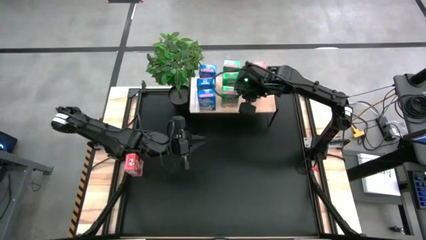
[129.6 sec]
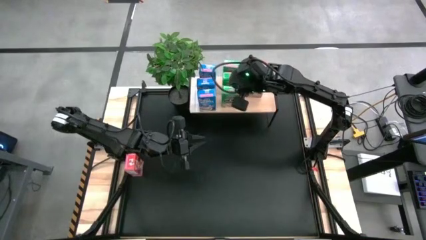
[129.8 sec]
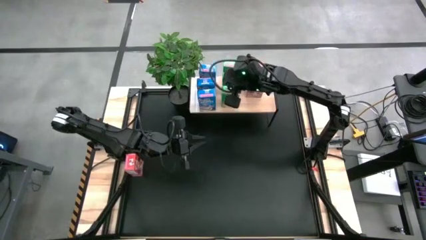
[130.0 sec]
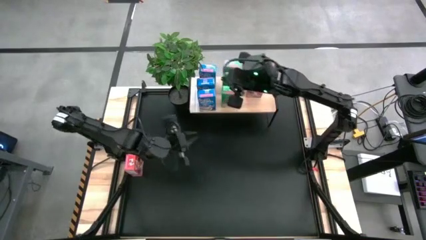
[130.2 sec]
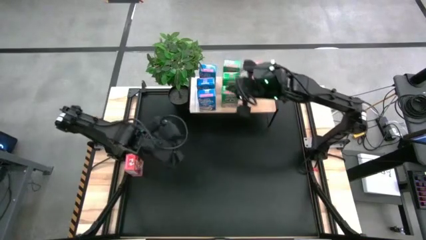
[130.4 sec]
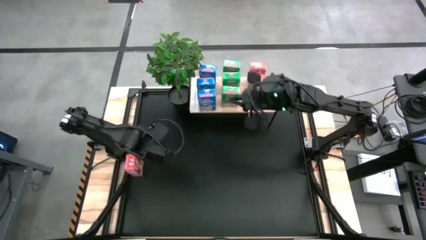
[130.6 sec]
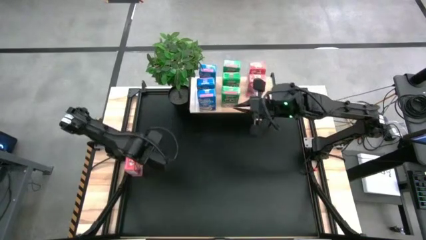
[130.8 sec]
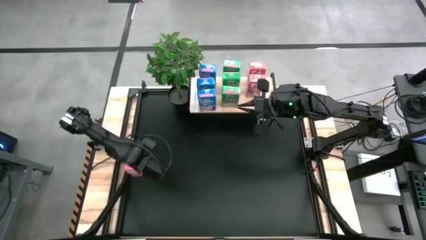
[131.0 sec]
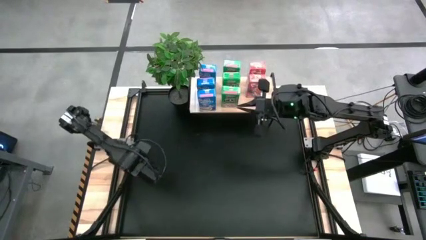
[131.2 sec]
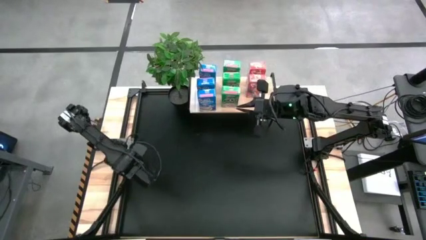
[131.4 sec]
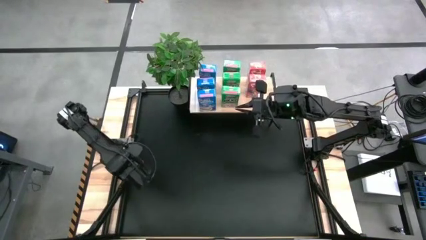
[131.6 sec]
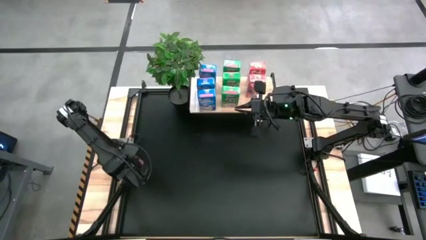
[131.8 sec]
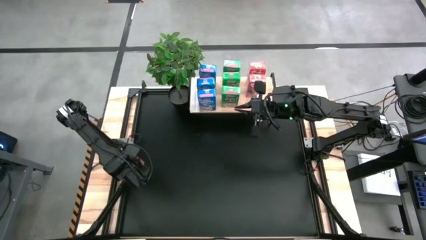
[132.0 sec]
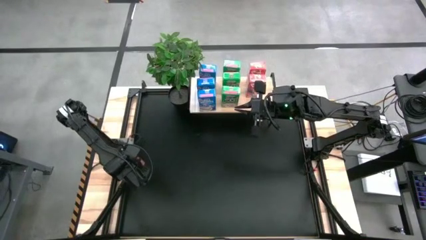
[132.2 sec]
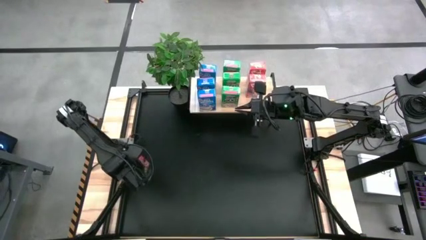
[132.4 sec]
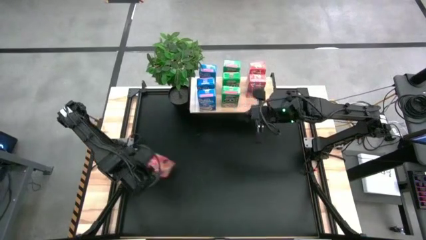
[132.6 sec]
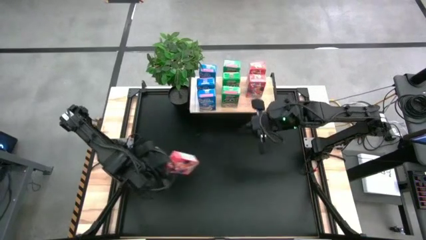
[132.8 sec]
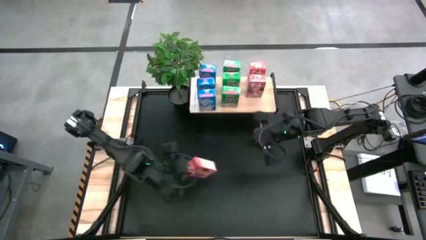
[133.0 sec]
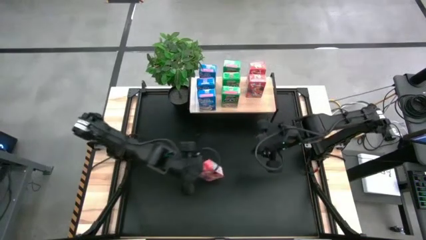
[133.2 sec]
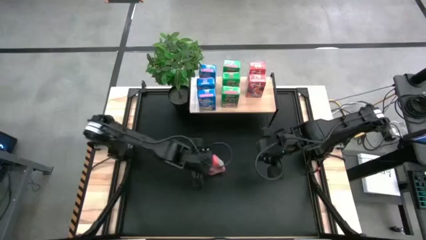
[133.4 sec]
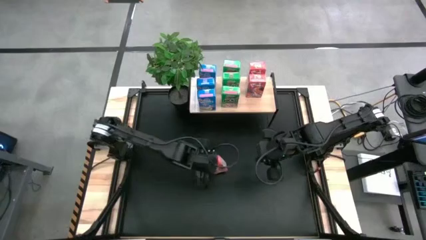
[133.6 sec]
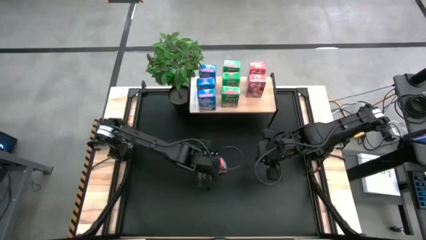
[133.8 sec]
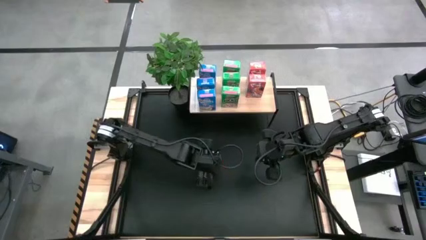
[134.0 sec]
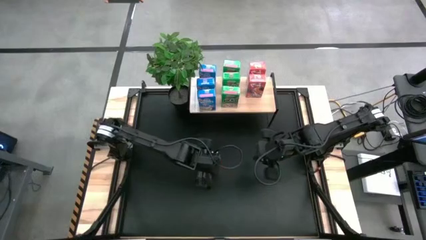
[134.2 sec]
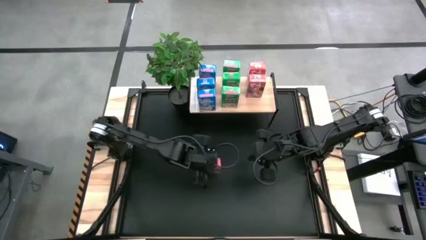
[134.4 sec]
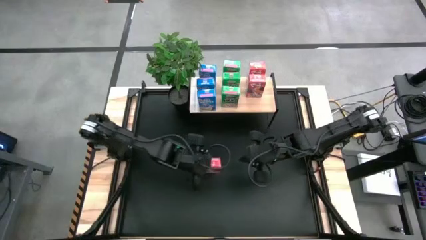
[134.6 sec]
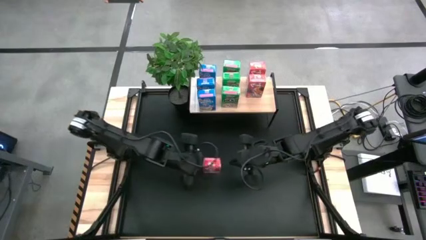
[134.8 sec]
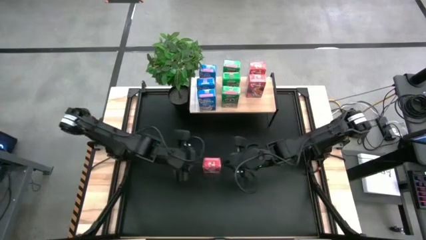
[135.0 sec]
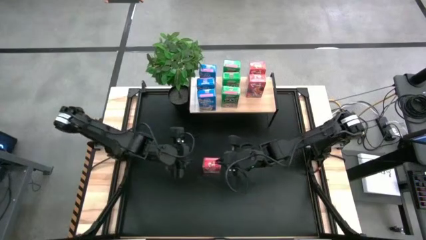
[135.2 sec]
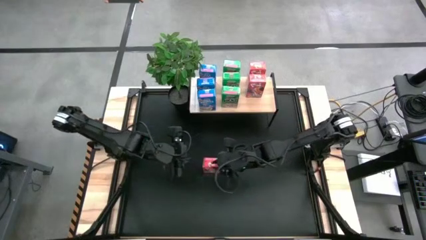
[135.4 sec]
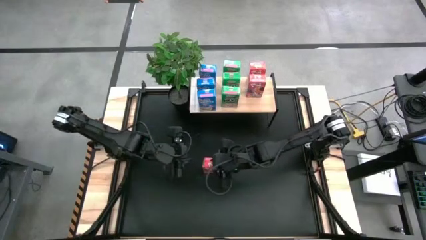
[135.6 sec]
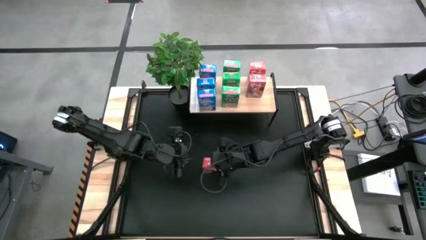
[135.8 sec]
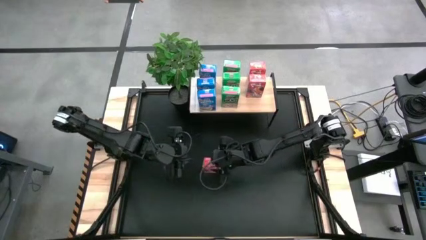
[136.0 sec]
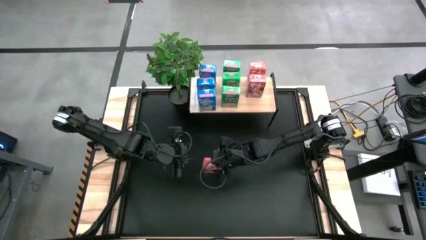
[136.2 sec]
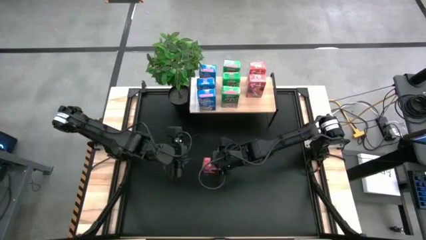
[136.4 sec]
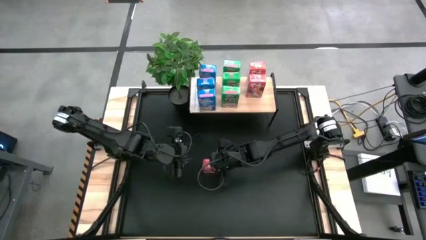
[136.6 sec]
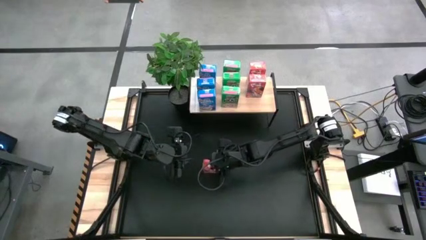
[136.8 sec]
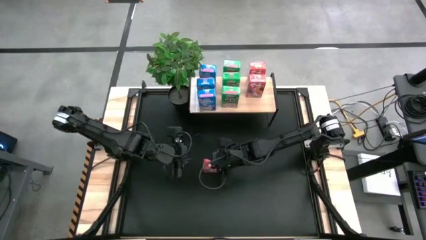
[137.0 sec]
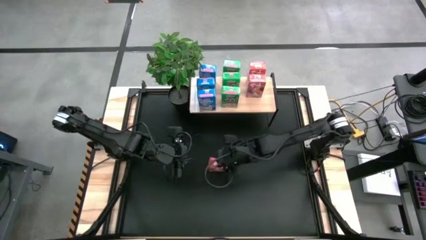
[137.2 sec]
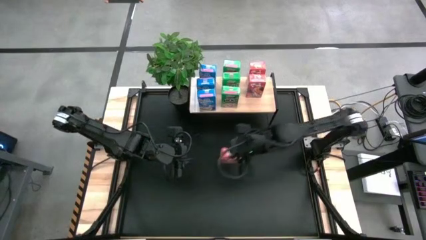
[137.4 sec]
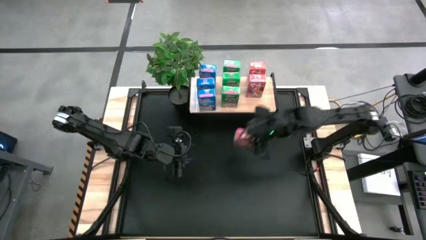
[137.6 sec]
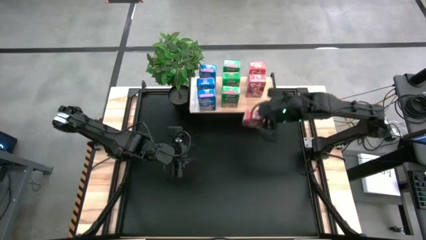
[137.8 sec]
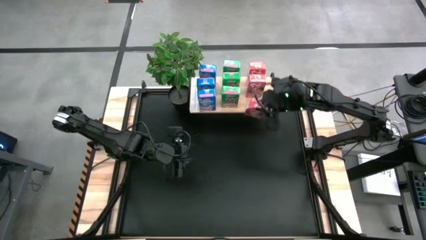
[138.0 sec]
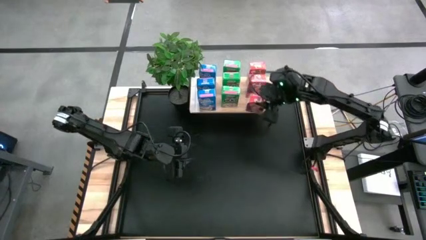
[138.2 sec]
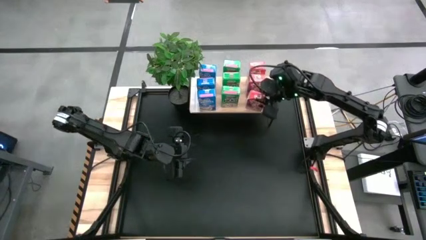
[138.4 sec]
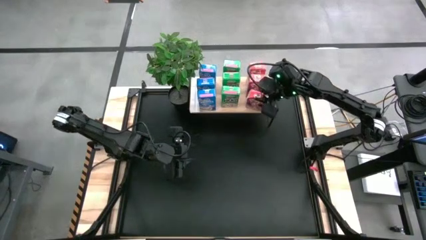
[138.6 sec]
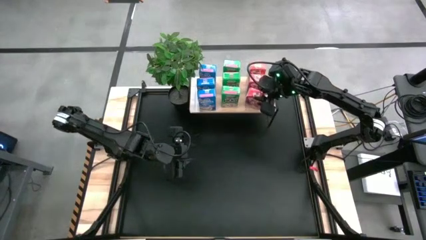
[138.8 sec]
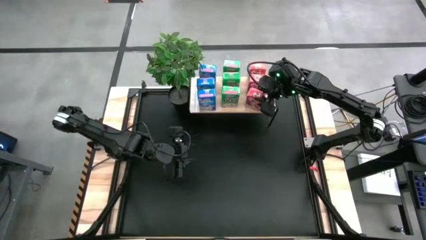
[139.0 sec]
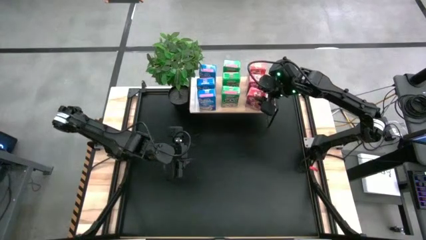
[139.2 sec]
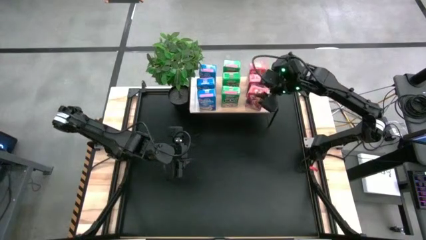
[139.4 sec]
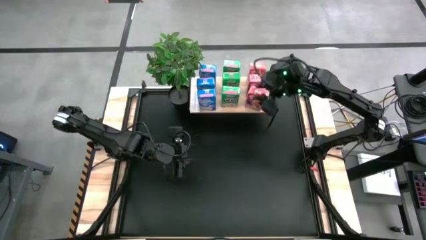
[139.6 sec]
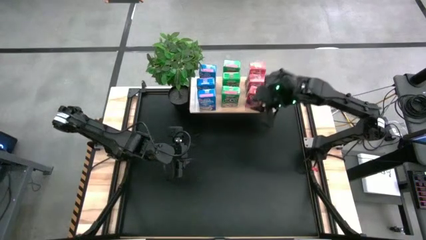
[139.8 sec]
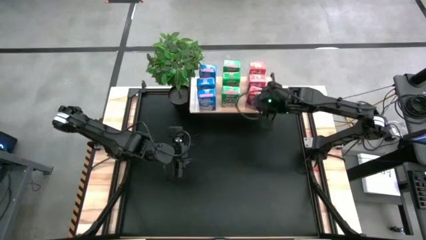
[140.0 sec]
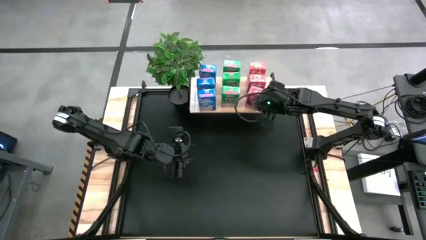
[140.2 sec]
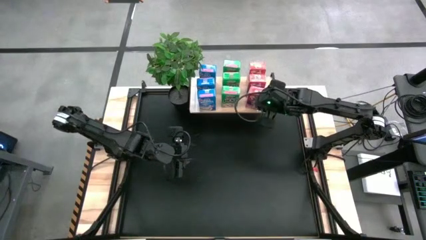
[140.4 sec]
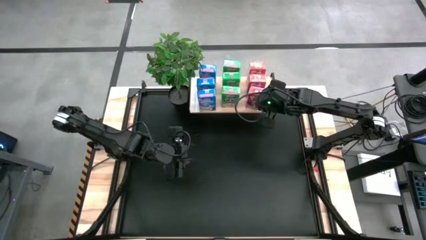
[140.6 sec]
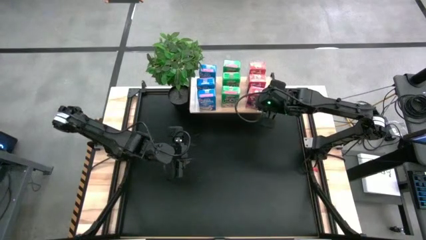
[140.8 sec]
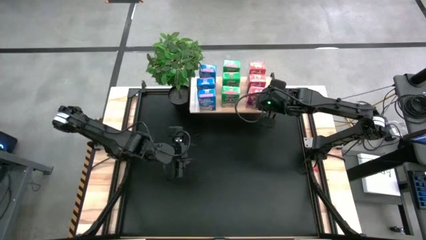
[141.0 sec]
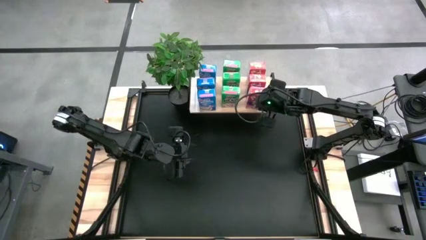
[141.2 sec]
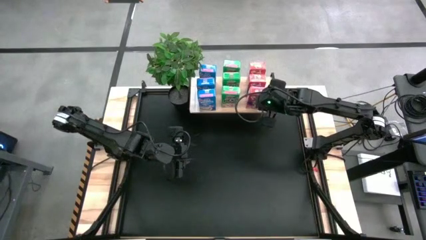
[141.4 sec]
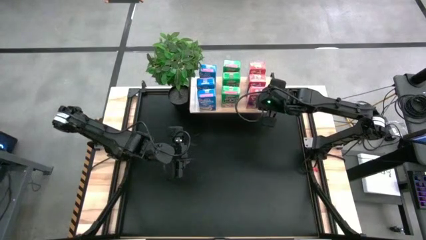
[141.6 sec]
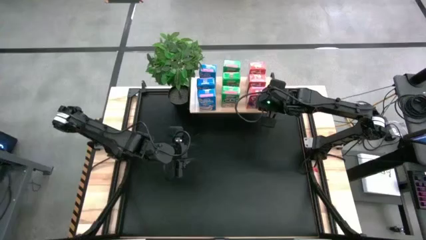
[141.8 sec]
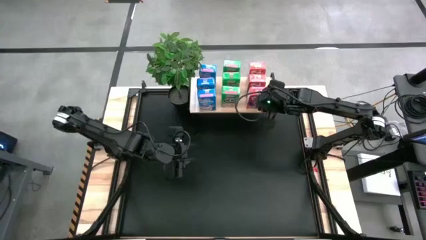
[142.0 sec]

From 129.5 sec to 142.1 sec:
Task: Stack cereal on shelf
Put the red cereal box on the shelf, aligned with the other red cereal box

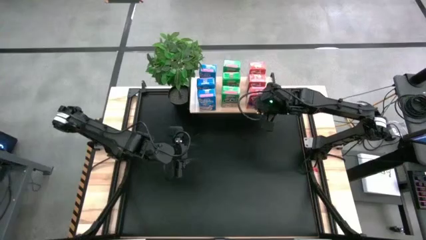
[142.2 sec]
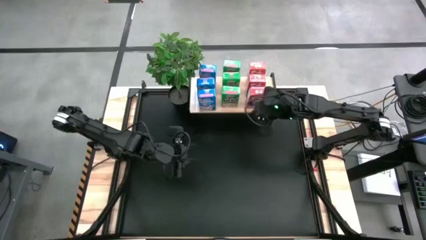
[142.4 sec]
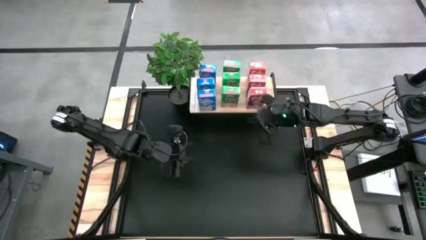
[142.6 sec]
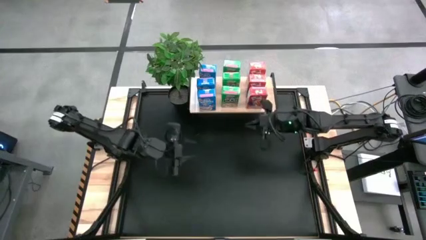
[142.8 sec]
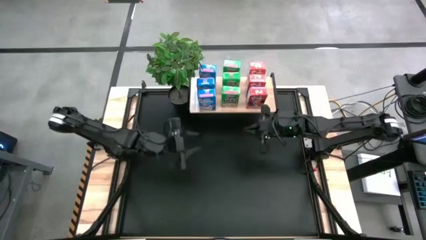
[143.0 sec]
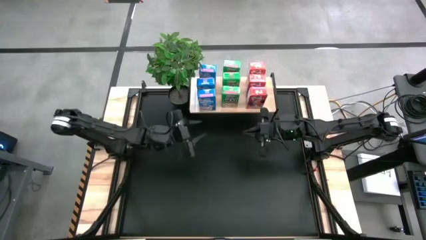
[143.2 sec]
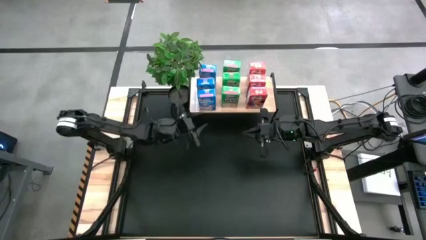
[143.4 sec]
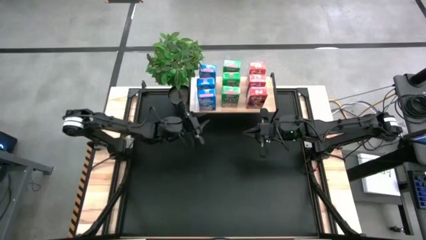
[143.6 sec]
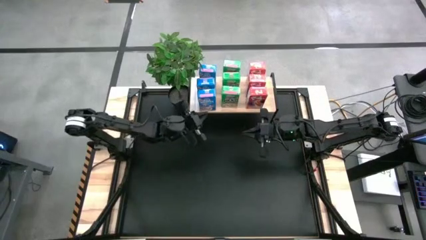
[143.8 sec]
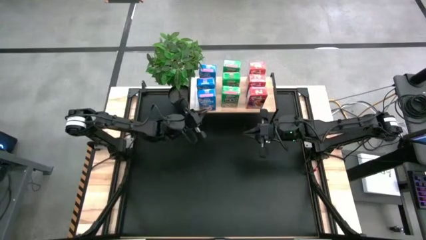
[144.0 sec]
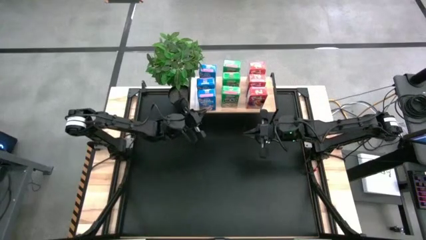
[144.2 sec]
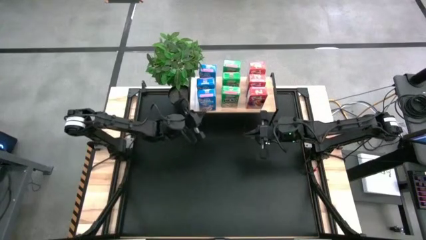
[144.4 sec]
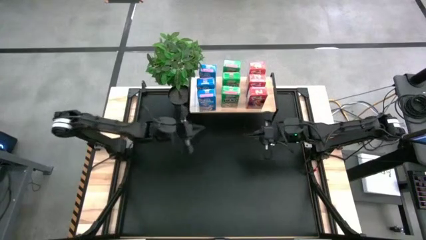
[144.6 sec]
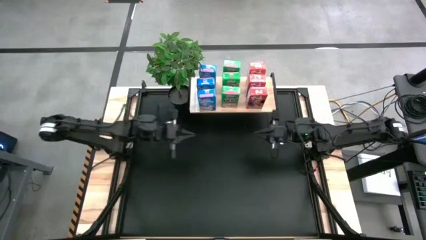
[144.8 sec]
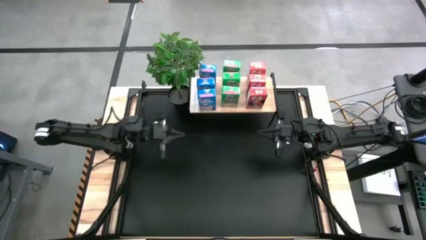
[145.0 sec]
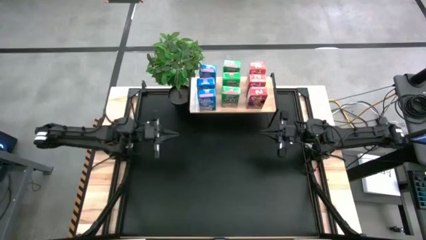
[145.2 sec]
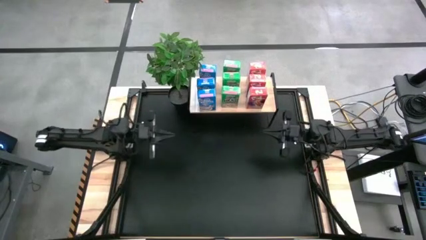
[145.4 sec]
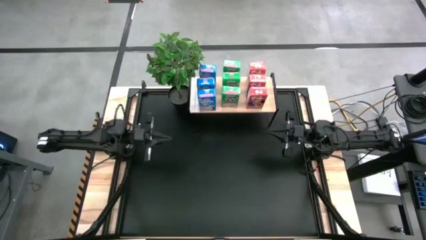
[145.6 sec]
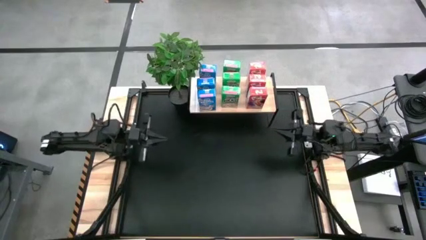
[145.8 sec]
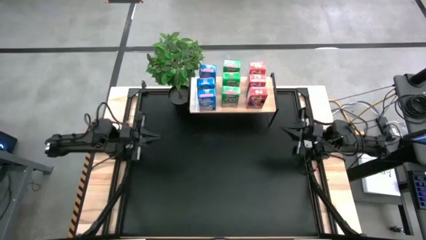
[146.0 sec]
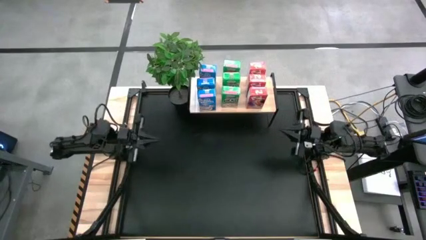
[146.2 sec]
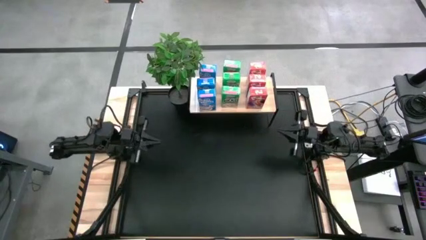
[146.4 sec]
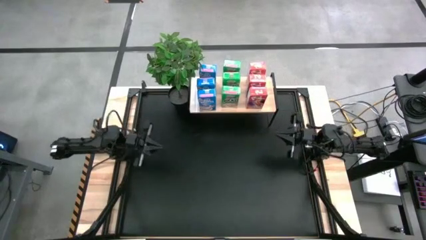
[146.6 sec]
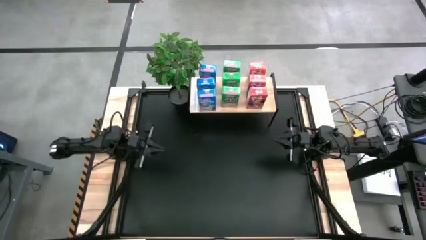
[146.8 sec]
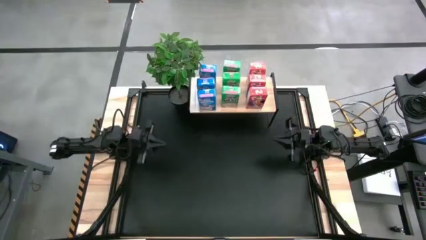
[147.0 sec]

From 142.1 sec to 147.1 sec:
Return to Home Position
